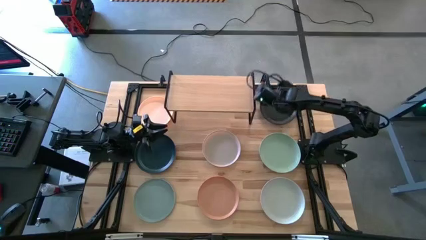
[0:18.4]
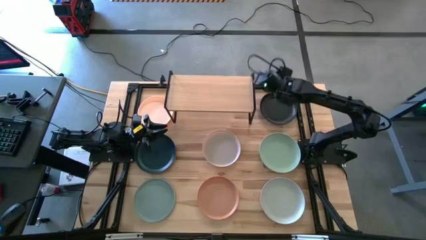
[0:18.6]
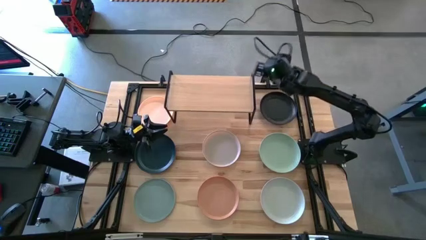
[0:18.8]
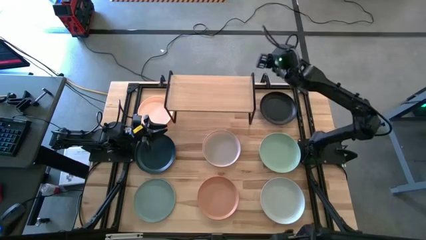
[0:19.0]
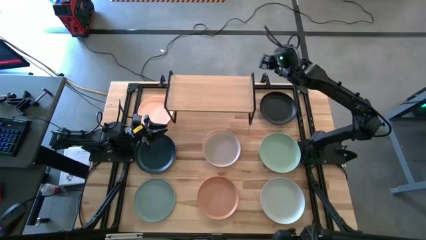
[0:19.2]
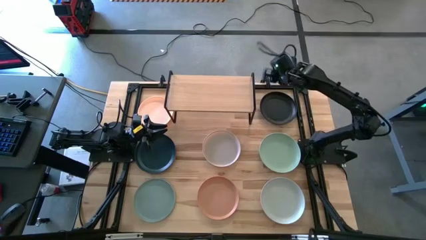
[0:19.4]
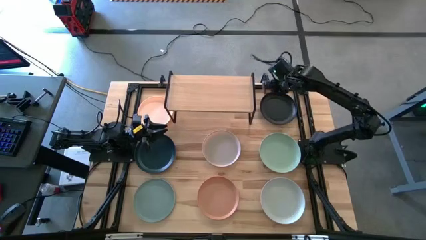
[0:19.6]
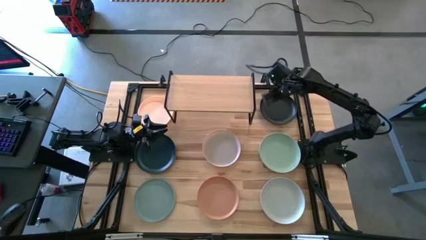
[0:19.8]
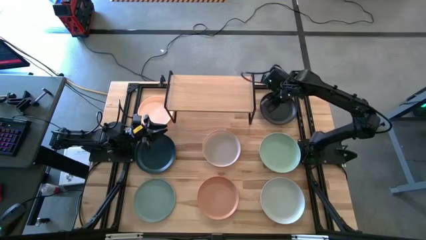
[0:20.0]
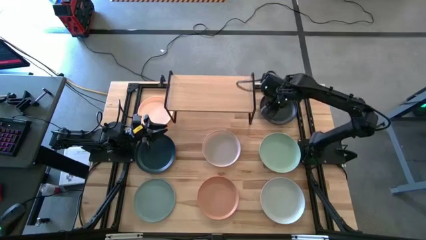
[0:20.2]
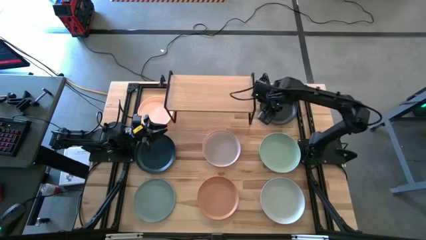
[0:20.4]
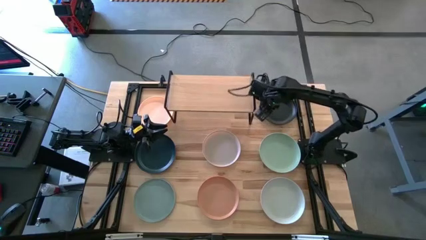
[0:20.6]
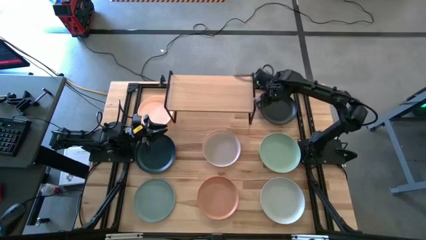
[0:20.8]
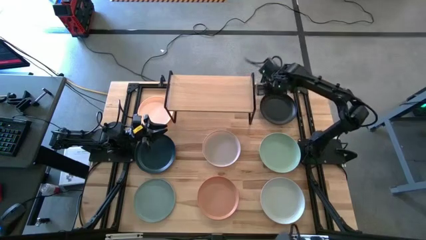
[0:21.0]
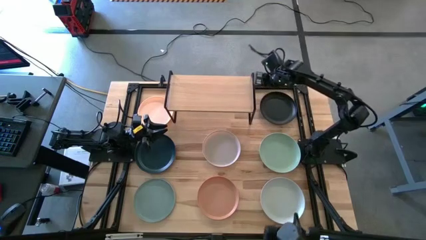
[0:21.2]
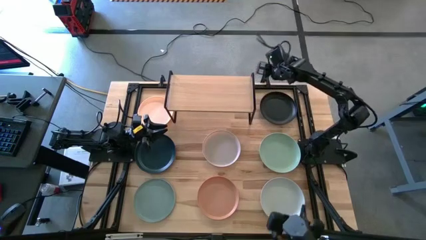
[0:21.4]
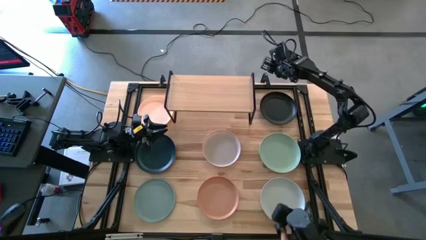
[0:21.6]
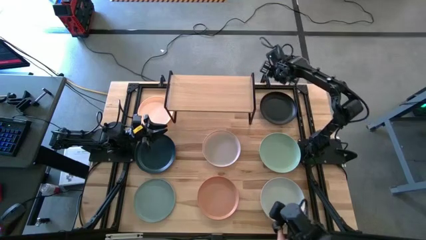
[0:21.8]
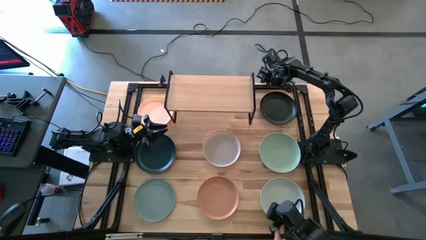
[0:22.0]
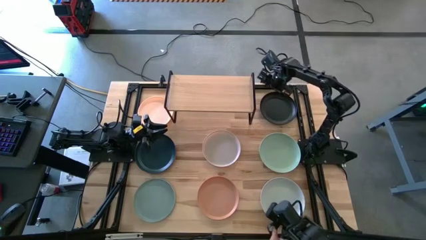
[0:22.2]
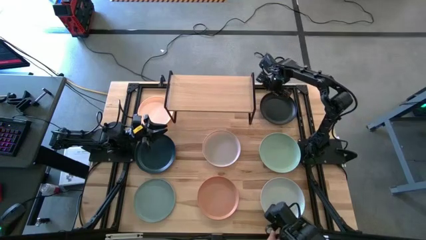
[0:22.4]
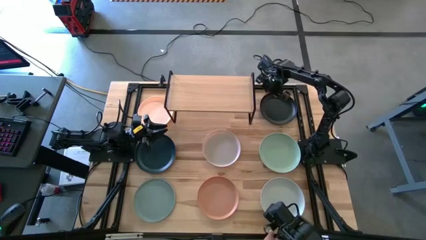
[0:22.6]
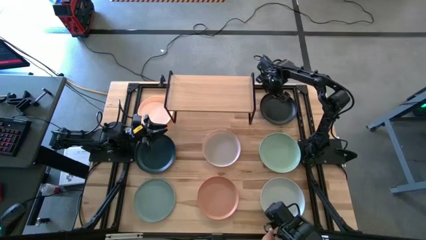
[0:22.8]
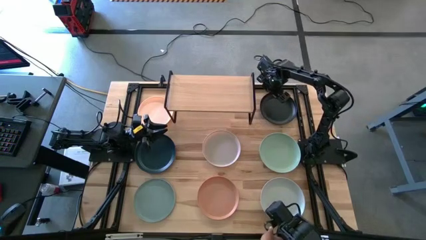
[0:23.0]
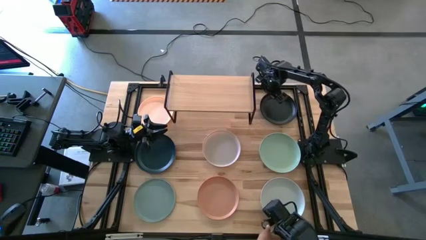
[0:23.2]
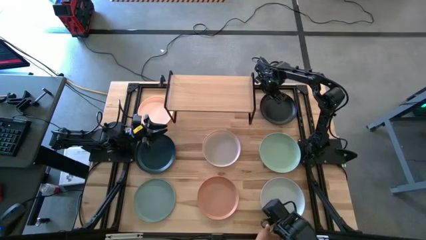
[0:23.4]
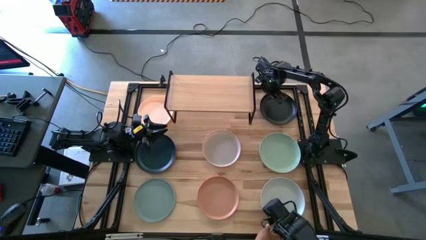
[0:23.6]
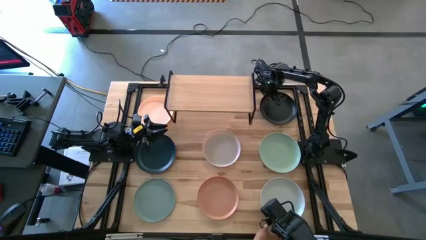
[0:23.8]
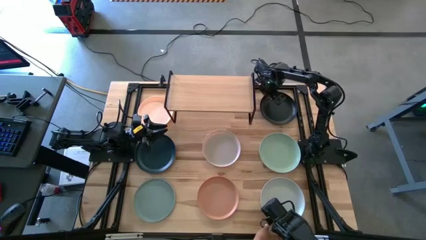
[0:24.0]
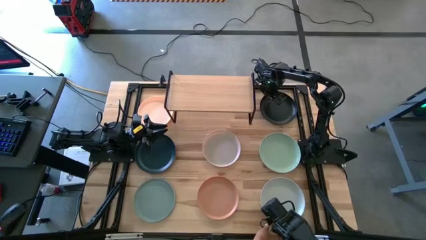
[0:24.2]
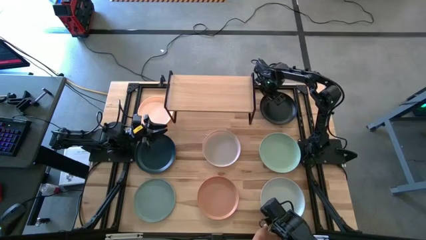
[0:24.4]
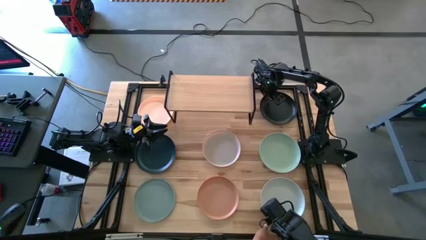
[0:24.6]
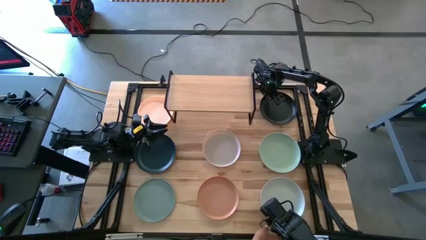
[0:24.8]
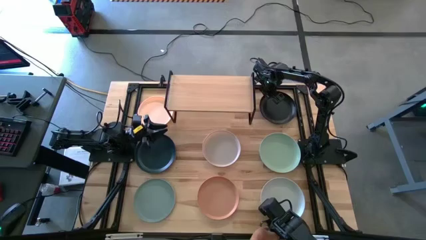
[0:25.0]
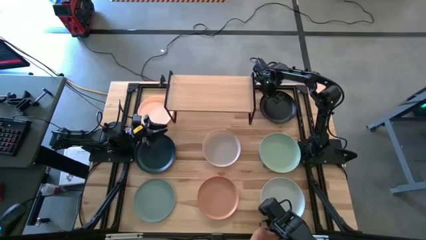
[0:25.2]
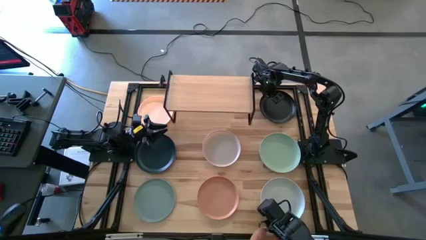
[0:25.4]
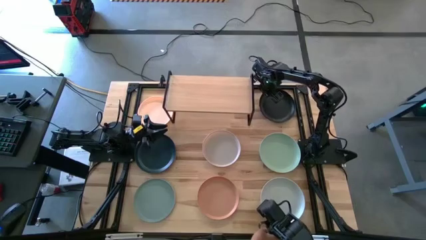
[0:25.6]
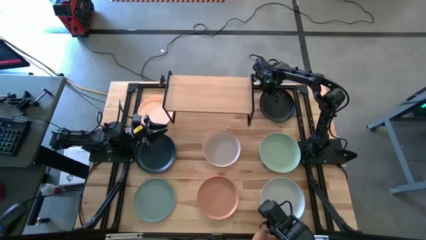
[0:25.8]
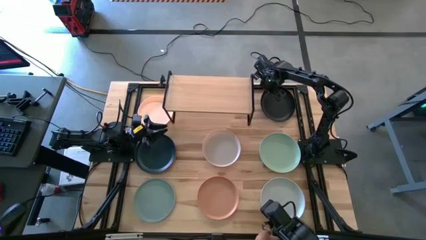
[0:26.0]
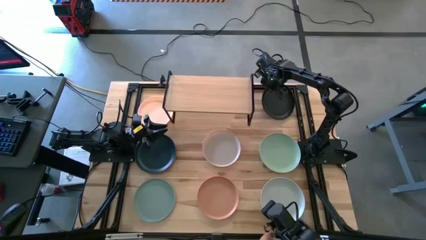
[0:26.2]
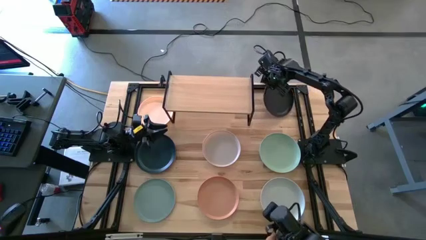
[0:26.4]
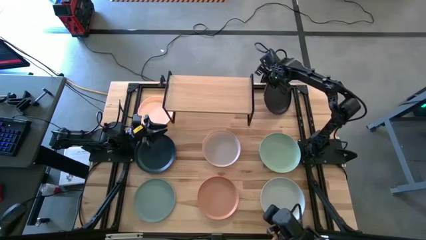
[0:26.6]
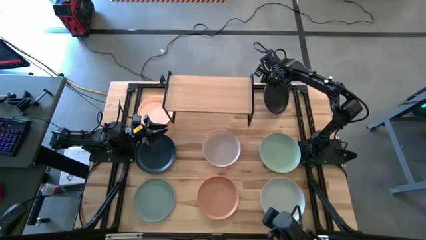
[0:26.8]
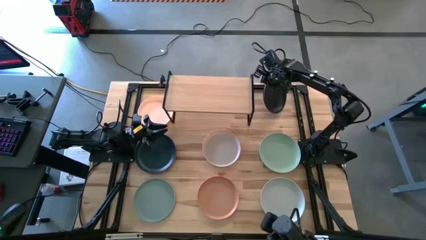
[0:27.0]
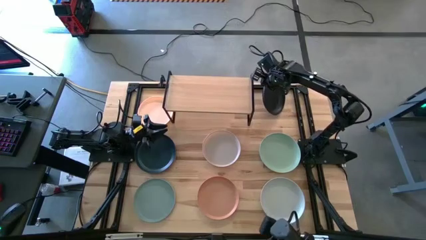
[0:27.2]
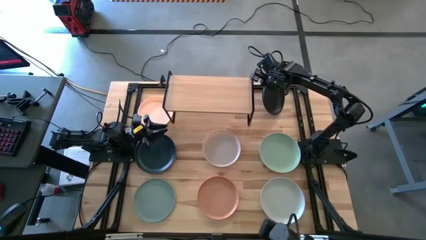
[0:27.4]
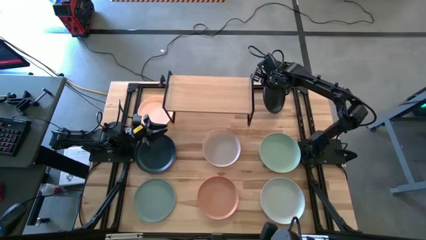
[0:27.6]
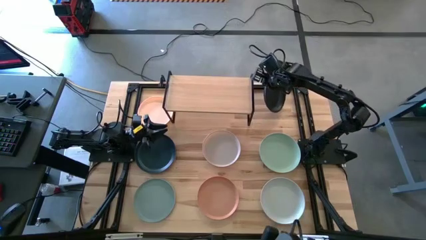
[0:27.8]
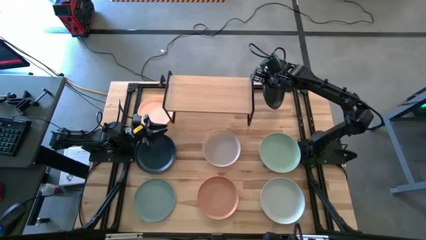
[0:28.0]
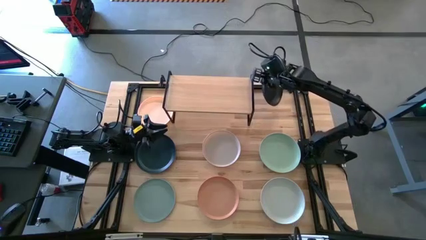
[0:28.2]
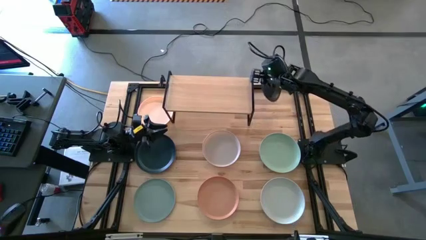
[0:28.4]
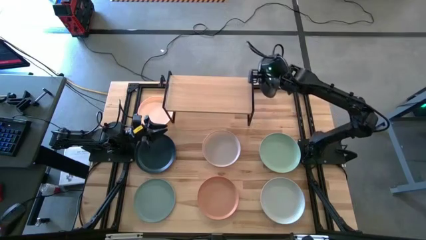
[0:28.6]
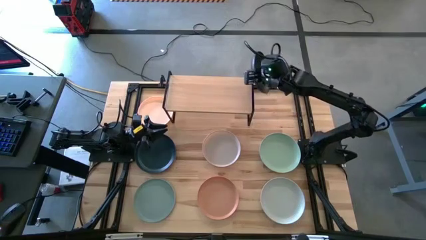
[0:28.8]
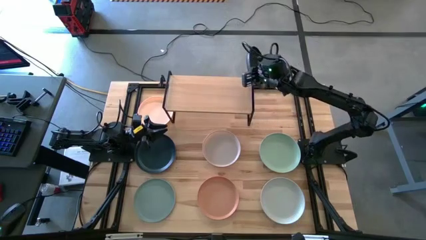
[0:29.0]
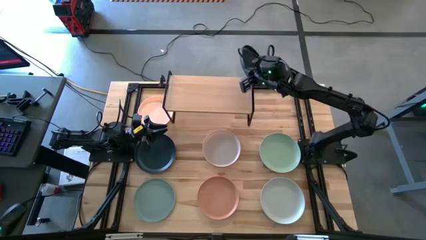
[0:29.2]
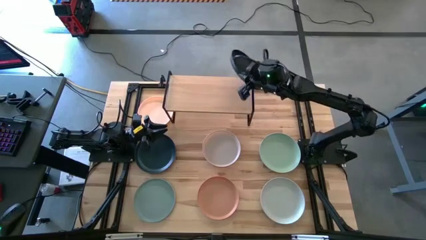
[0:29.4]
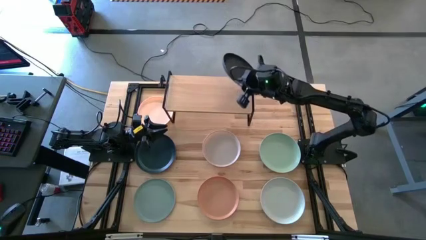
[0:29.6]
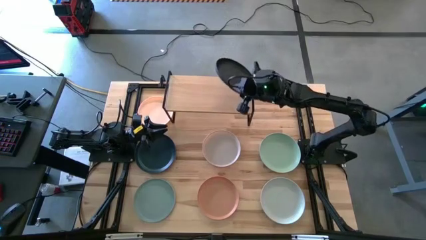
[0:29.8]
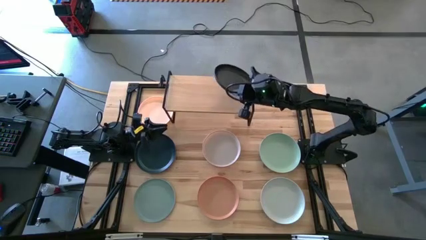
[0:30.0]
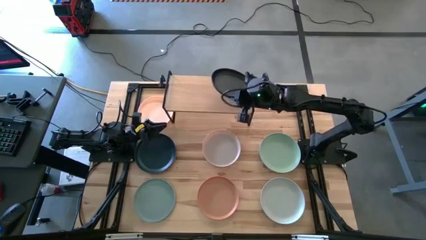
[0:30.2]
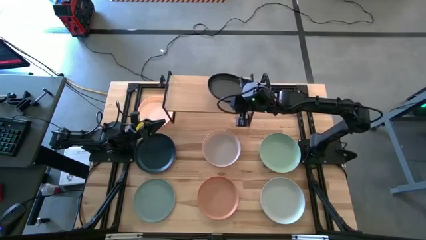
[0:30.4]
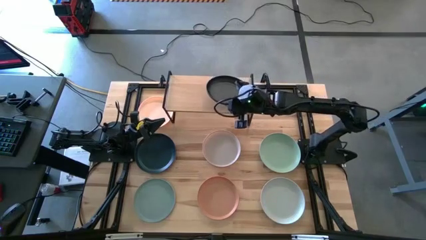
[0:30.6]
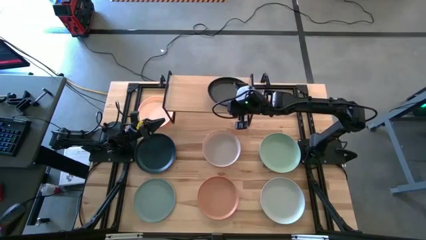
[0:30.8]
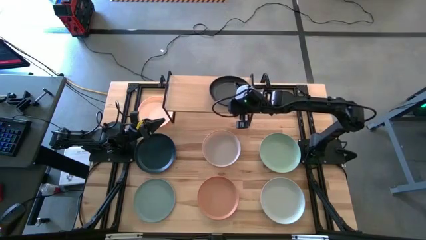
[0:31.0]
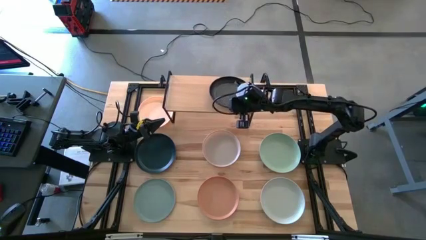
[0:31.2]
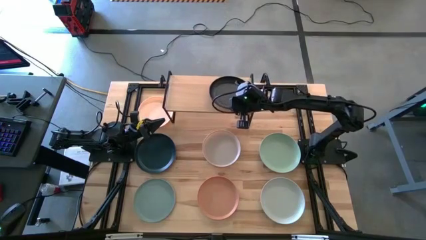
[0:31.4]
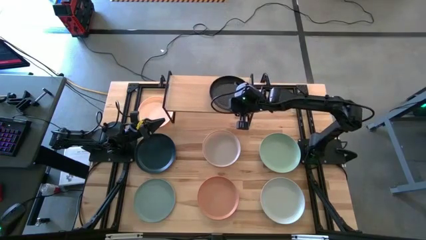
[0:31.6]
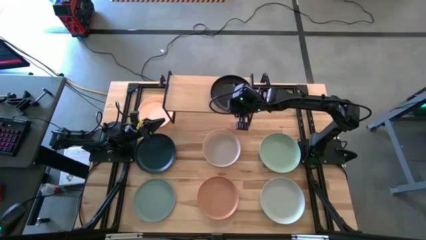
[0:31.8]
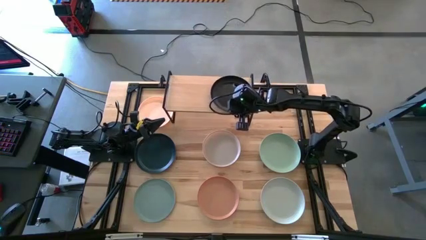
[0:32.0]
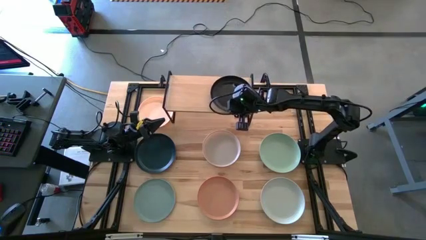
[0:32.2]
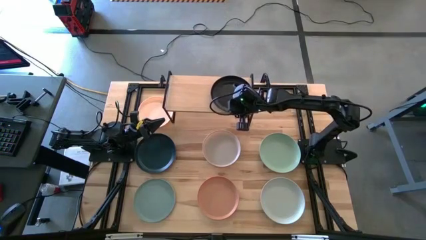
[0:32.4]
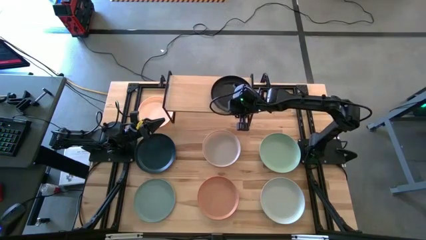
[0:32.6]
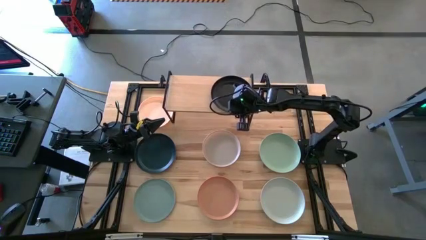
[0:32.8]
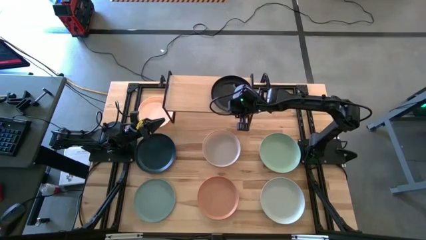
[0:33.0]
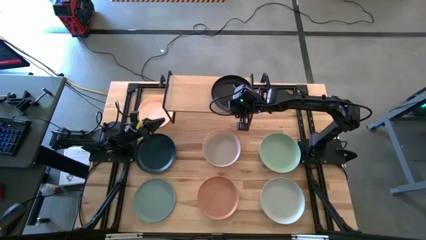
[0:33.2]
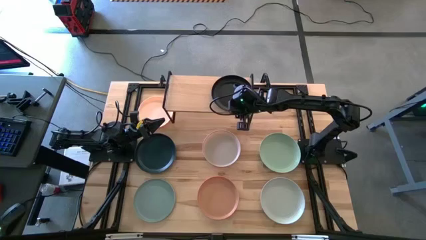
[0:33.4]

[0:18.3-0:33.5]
Task: Place and stack plates onto a shelf
Put the black plate on the shelf
